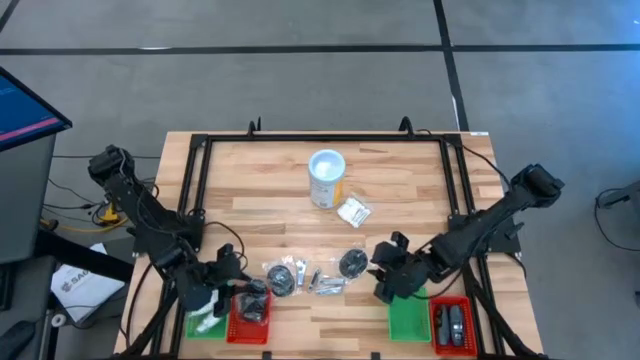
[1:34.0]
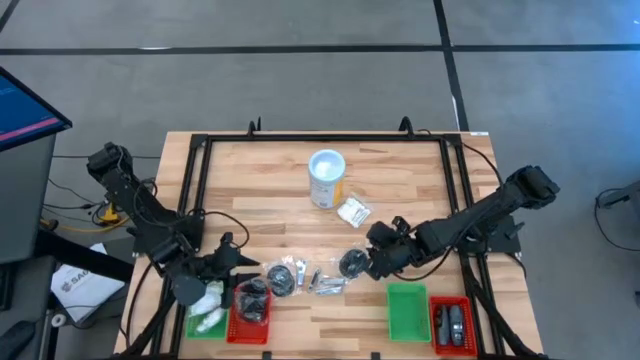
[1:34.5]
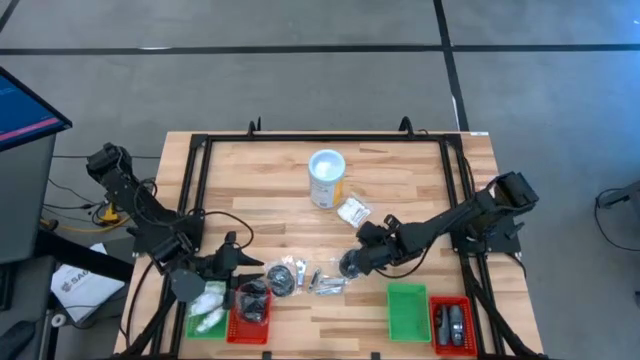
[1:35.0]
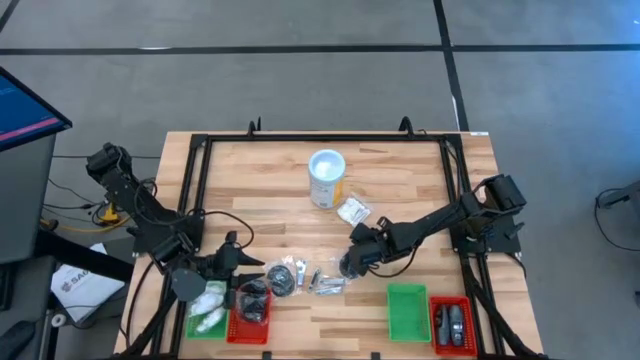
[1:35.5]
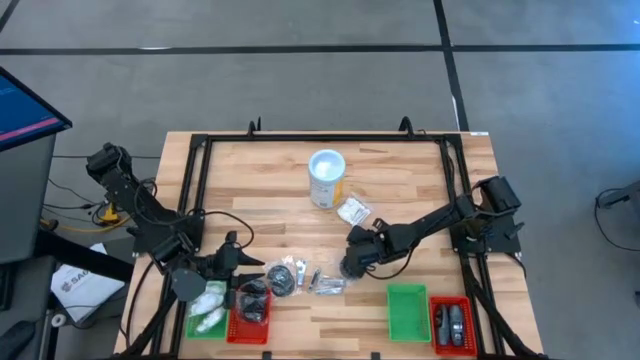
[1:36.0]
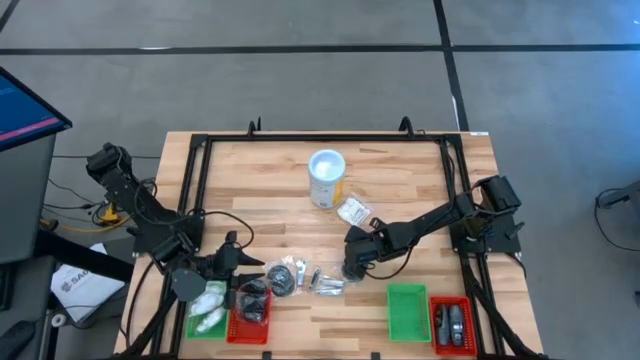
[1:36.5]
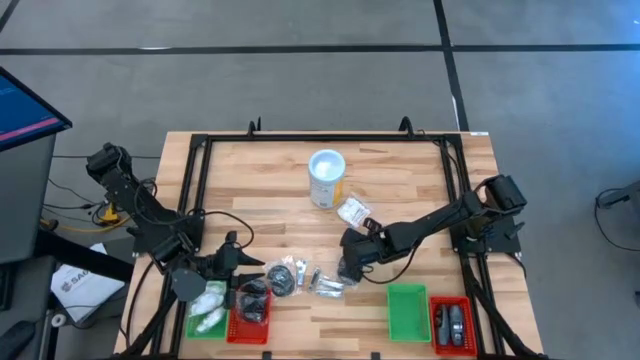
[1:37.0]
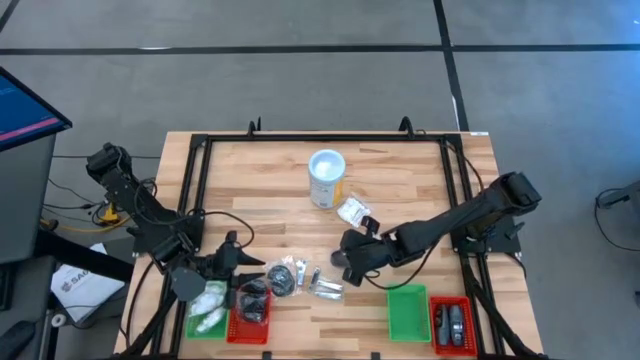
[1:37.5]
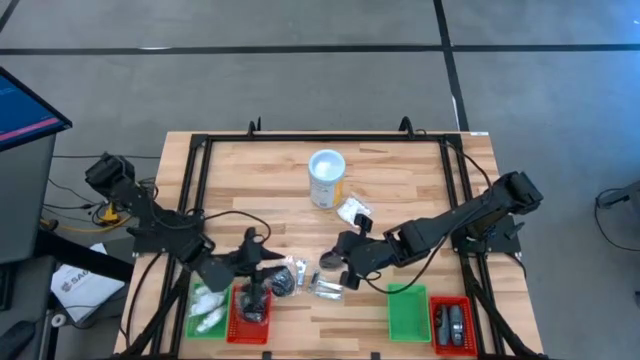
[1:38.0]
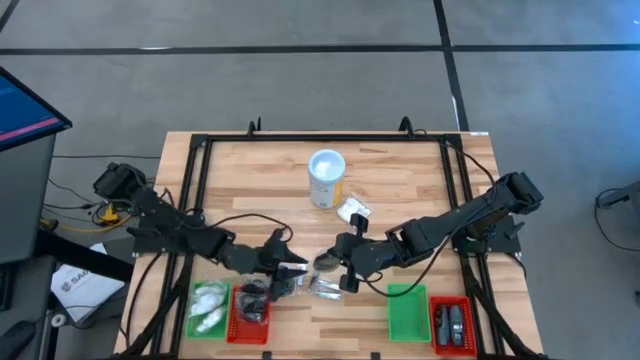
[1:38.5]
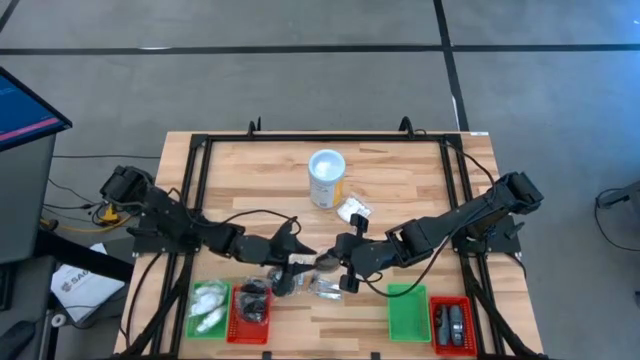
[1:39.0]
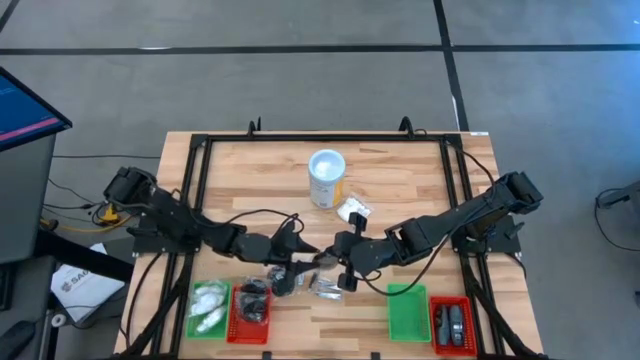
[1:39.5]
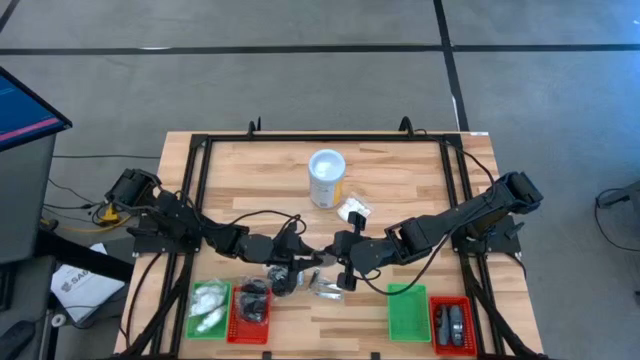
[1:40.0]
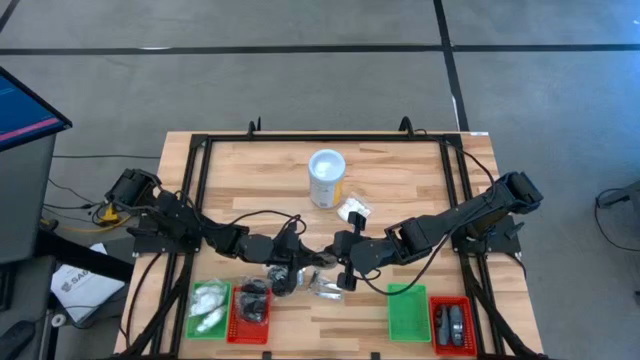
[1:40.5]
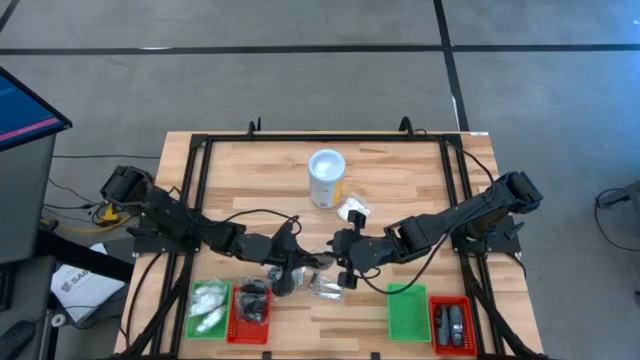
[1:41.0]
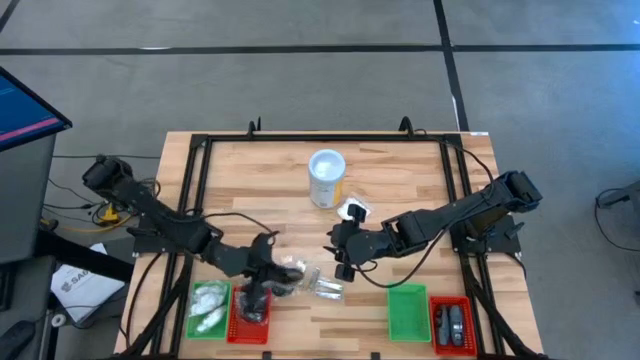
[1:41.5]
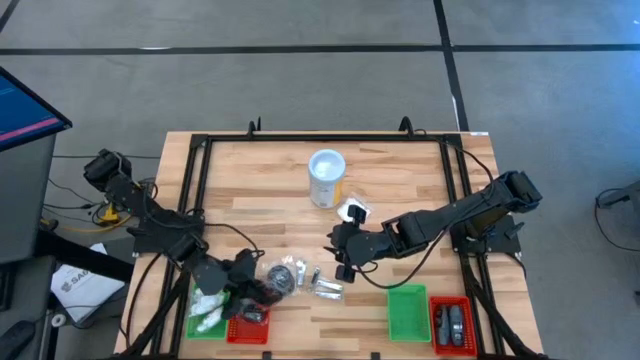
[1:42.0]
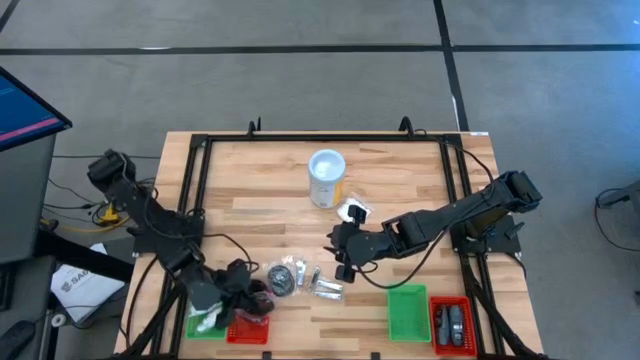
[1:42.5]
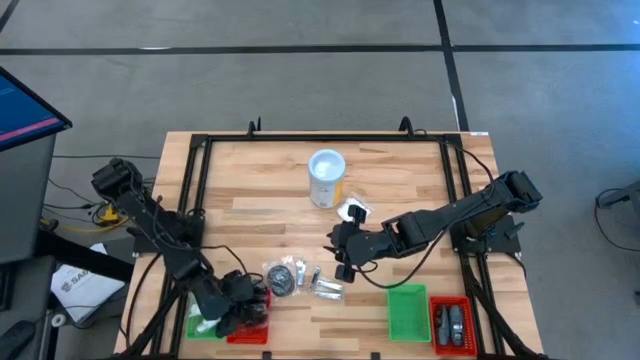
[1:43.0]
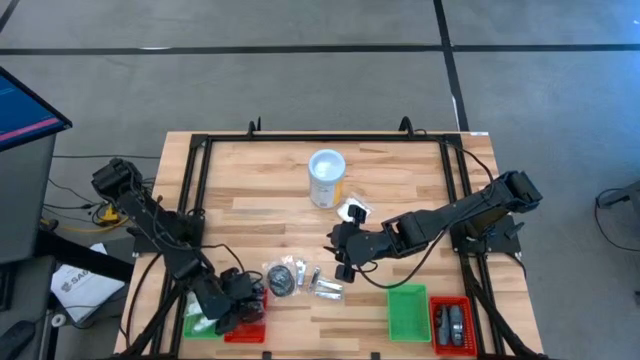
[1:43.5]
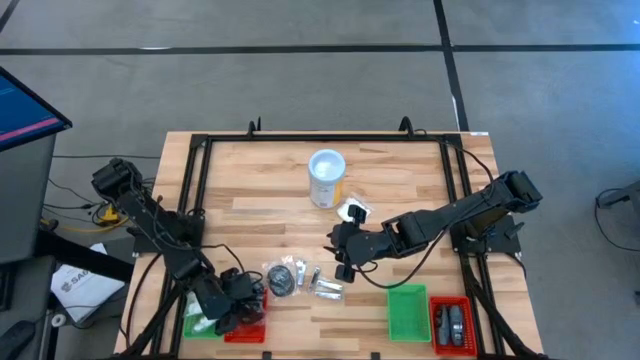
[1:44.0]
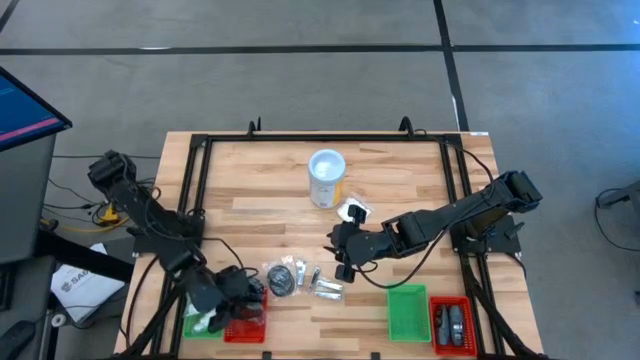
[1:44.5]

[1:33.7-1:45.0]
Task: Pick & Place Travel size toiletries
Put the hairbrush into the left red bin

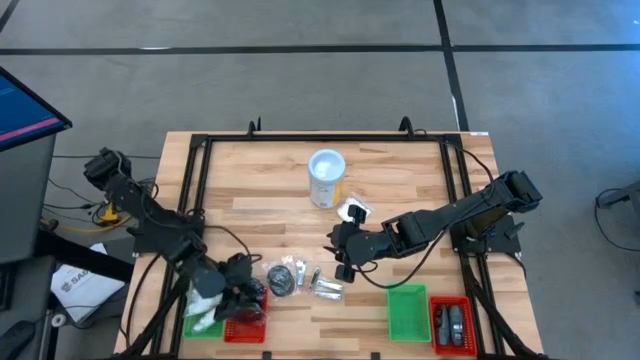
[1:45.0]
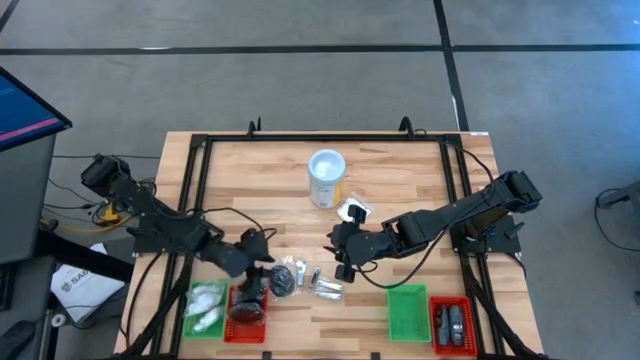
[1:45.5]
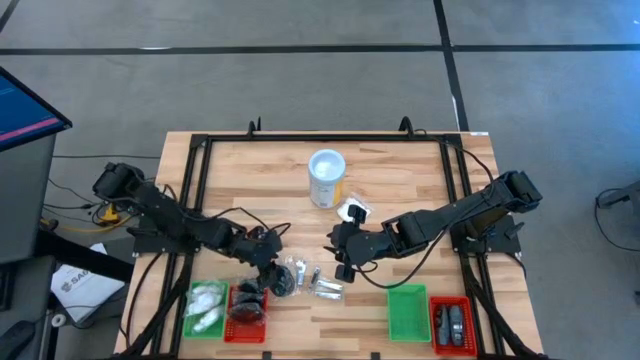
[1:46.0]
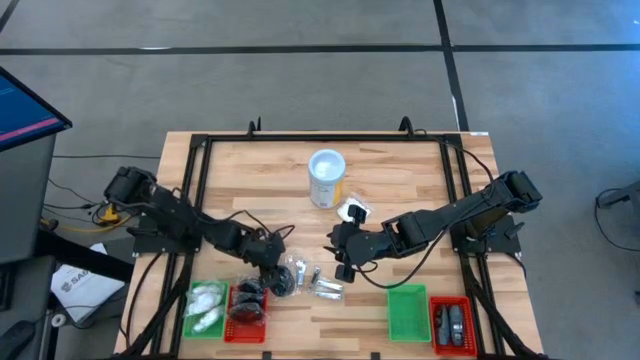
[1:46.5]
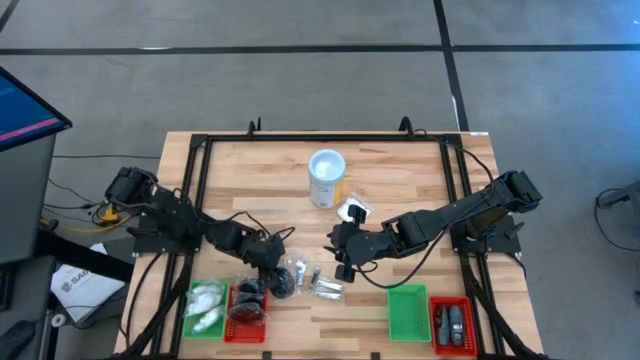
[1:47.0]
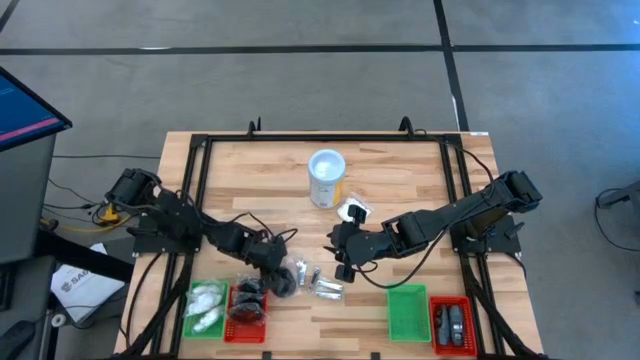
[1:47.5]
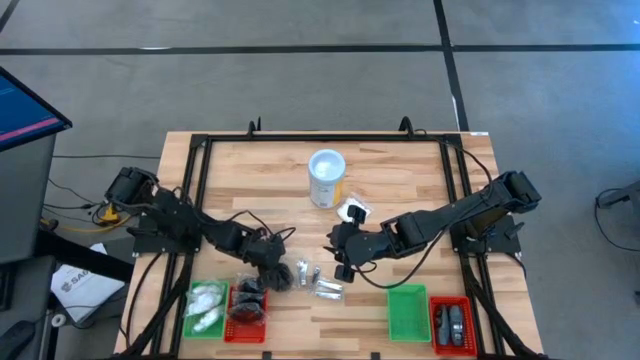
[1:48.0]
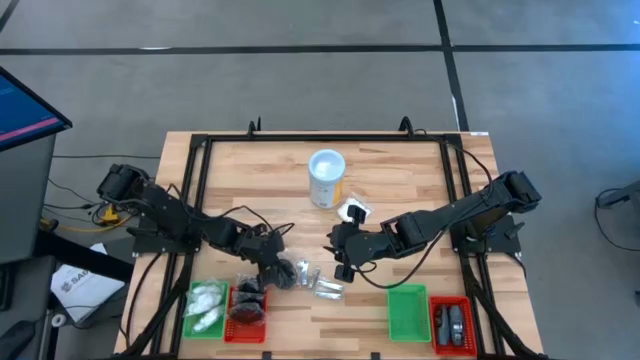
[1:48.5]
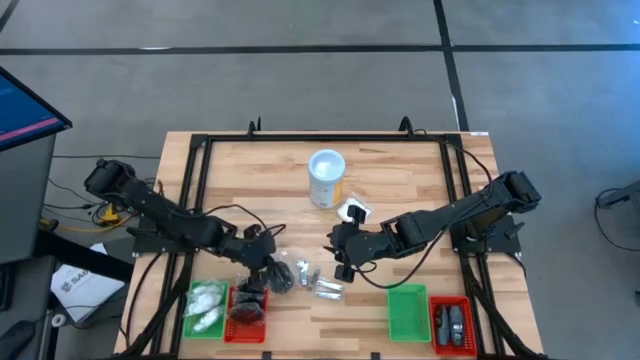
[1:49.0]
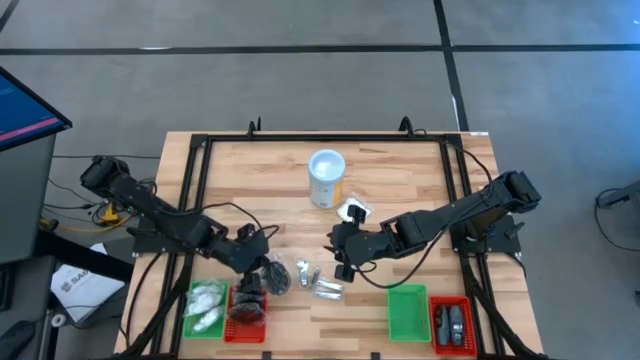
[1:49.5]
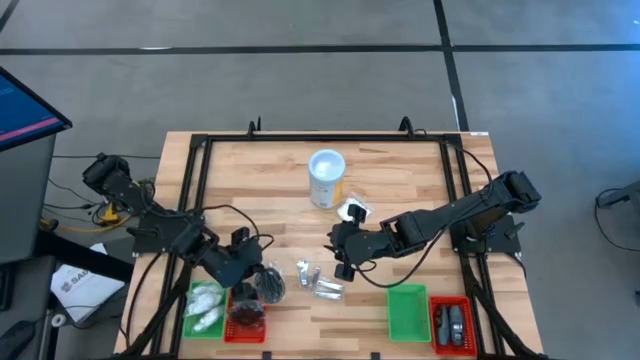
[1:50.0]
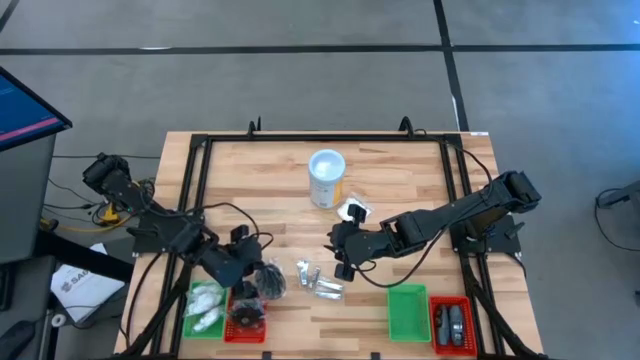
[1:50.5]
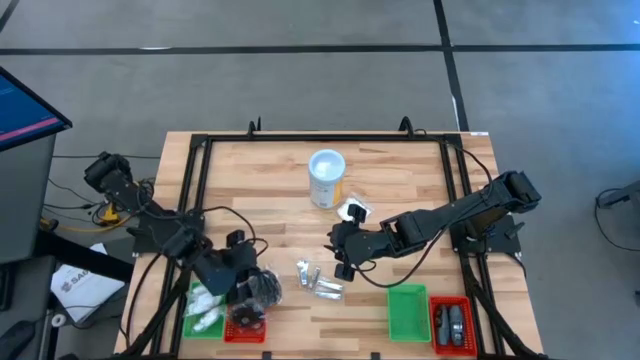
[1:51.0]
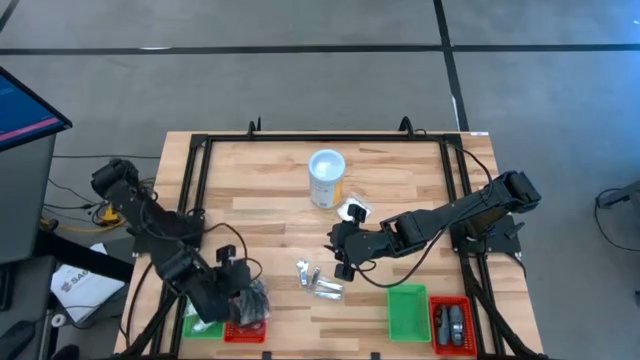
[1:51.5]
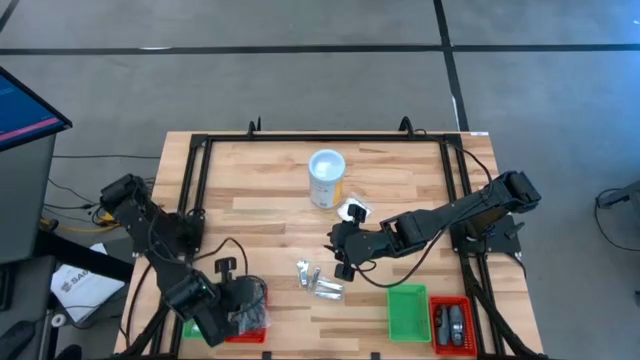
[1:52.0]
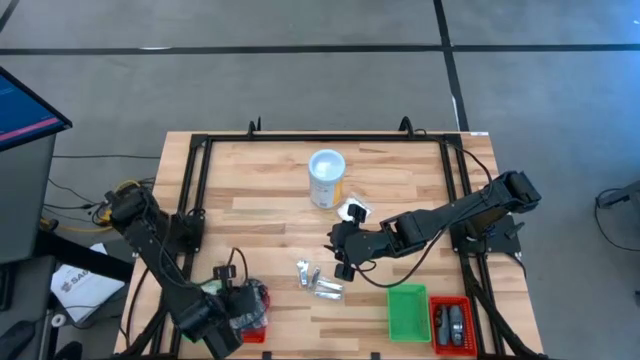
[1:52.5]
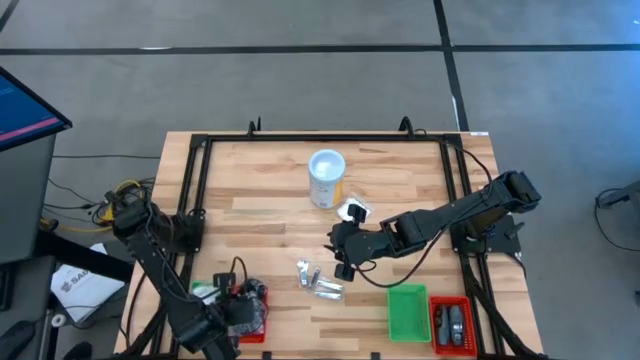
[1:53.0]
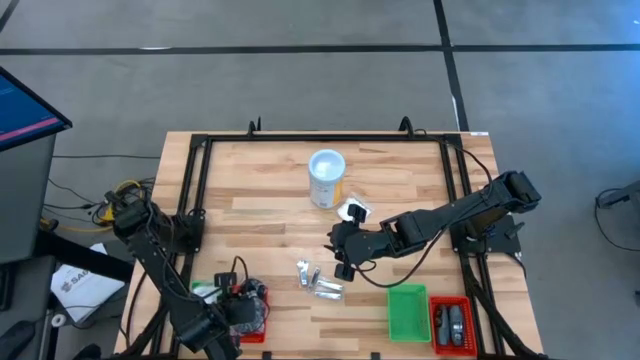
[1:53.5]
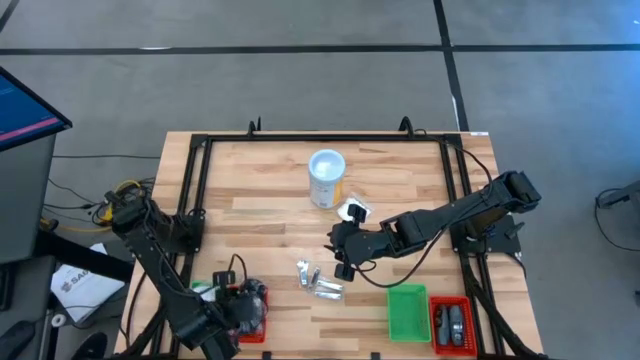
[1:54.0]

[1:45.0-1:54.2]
Put the hairbrush into the left red bin
